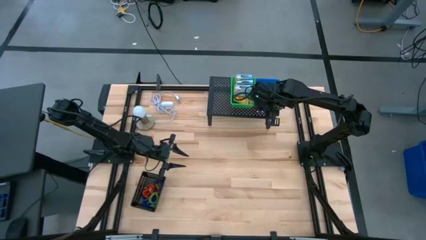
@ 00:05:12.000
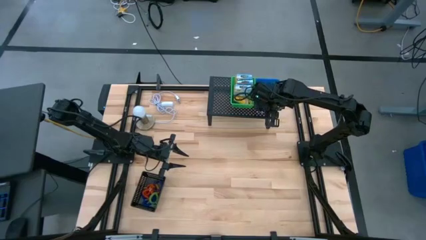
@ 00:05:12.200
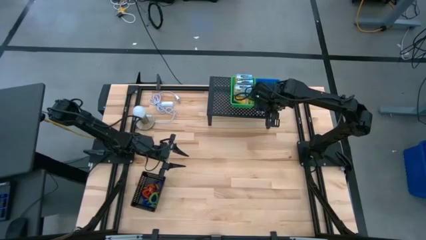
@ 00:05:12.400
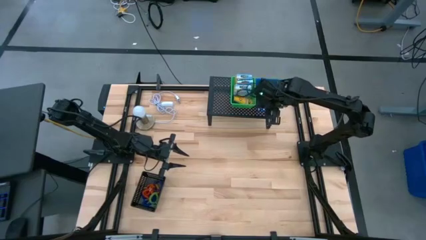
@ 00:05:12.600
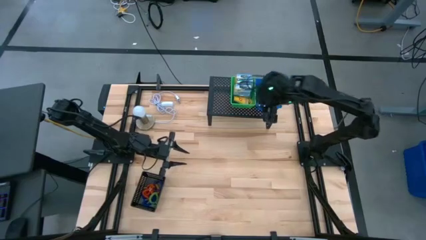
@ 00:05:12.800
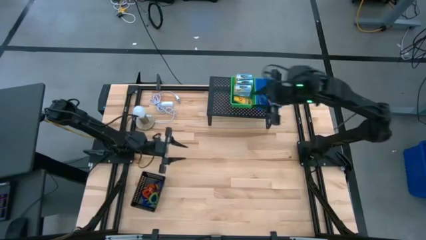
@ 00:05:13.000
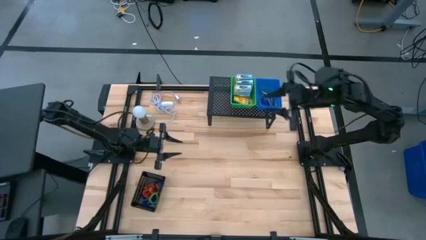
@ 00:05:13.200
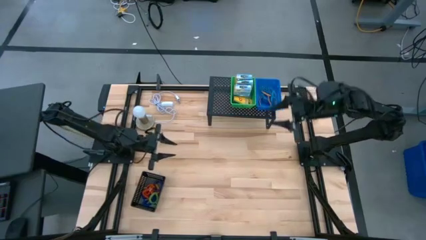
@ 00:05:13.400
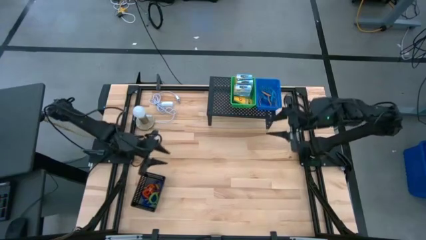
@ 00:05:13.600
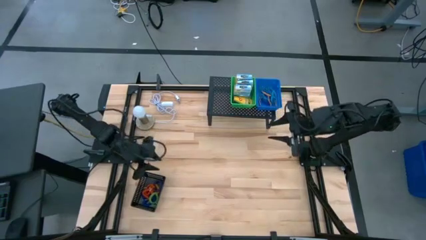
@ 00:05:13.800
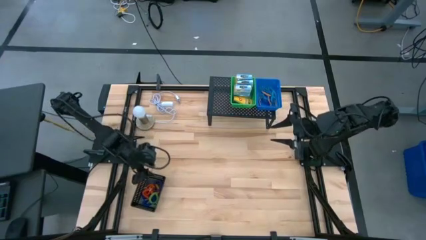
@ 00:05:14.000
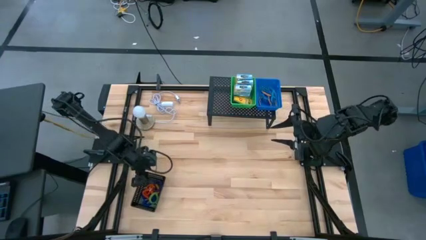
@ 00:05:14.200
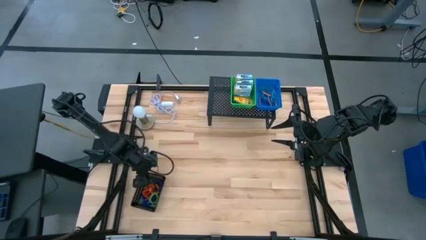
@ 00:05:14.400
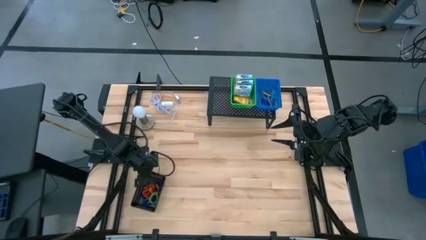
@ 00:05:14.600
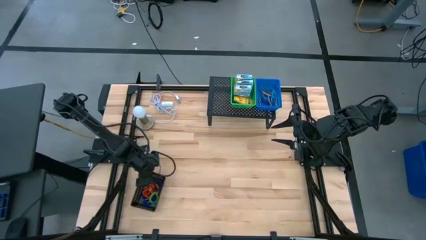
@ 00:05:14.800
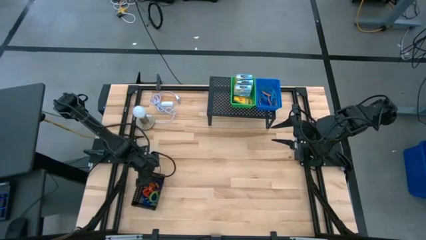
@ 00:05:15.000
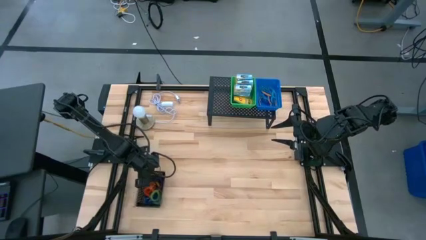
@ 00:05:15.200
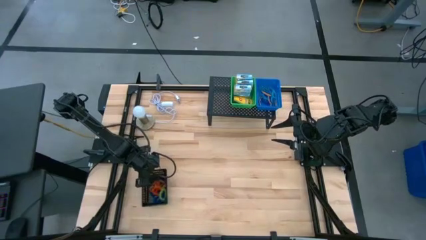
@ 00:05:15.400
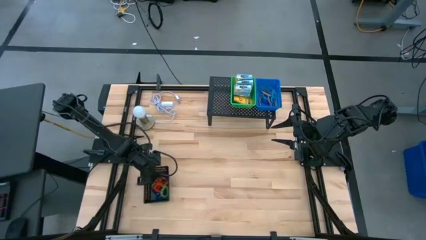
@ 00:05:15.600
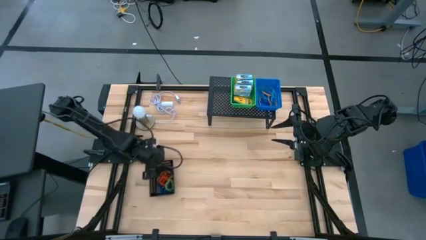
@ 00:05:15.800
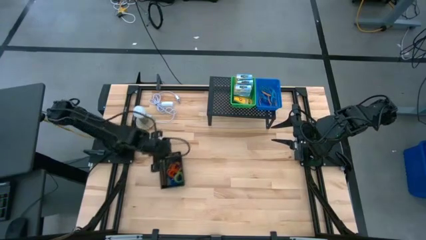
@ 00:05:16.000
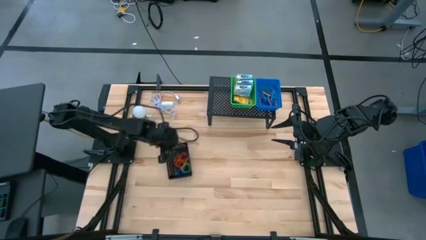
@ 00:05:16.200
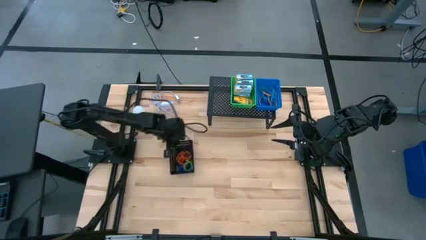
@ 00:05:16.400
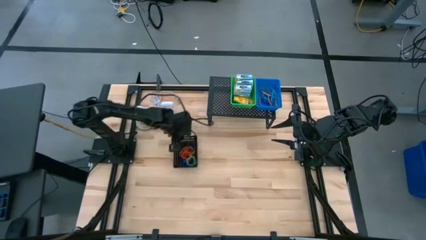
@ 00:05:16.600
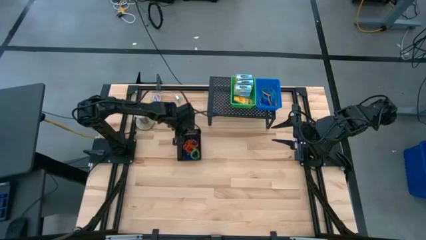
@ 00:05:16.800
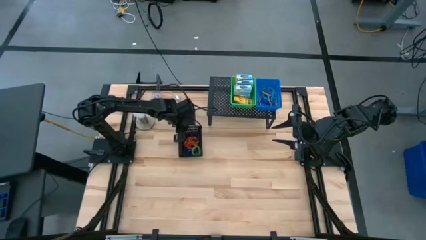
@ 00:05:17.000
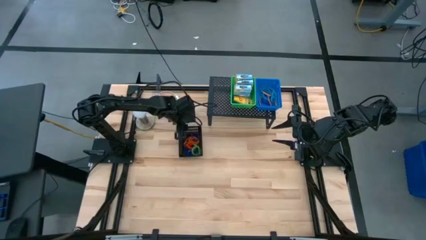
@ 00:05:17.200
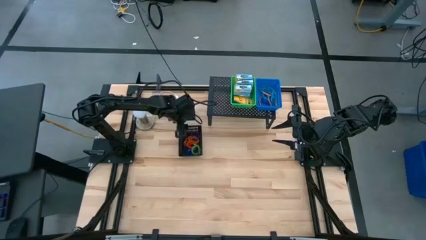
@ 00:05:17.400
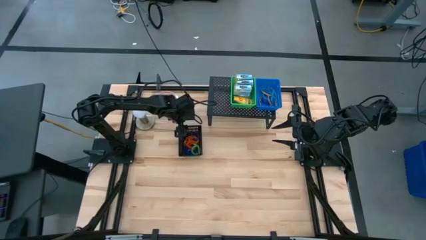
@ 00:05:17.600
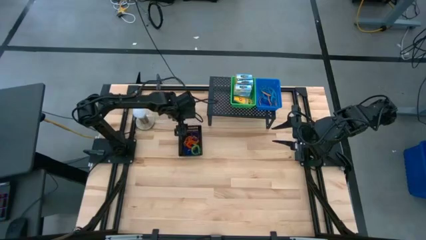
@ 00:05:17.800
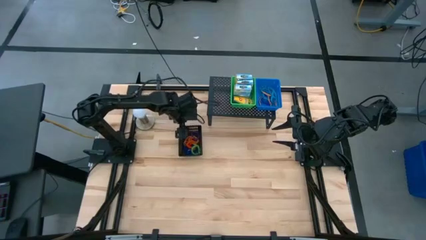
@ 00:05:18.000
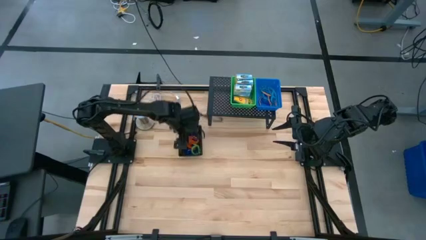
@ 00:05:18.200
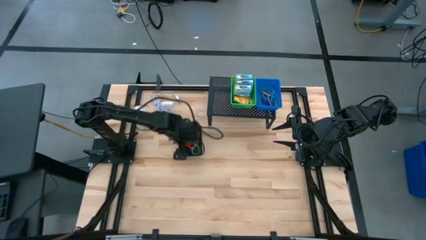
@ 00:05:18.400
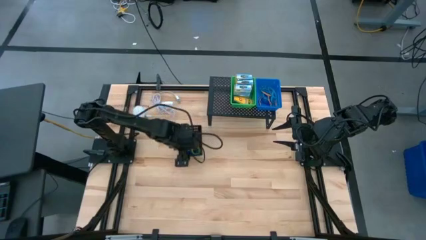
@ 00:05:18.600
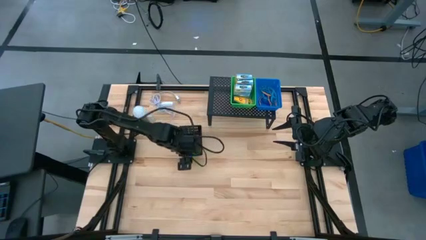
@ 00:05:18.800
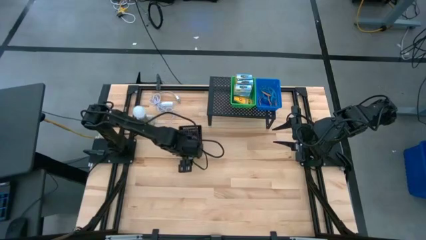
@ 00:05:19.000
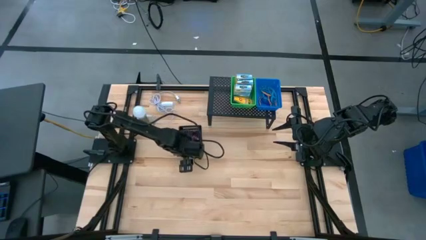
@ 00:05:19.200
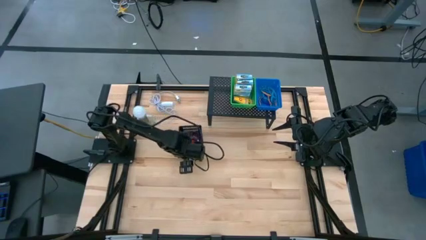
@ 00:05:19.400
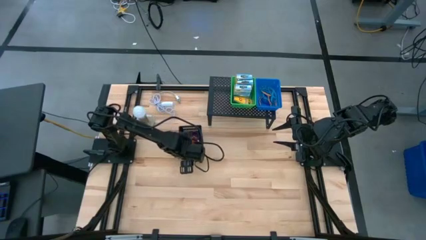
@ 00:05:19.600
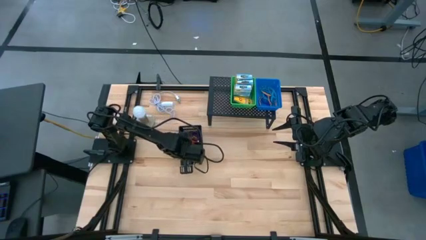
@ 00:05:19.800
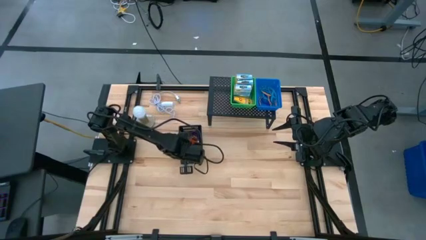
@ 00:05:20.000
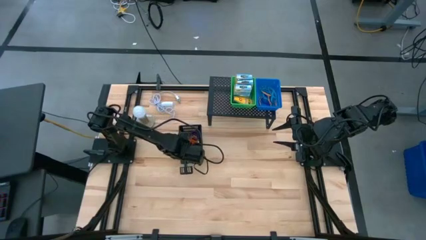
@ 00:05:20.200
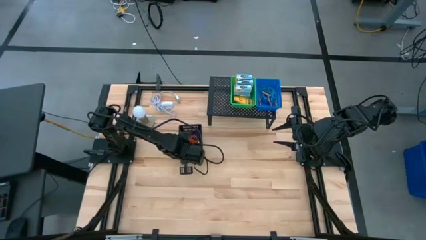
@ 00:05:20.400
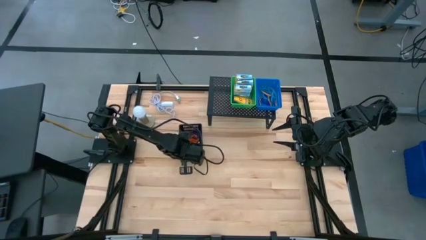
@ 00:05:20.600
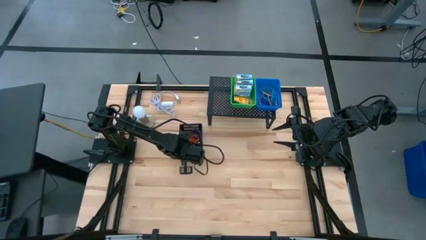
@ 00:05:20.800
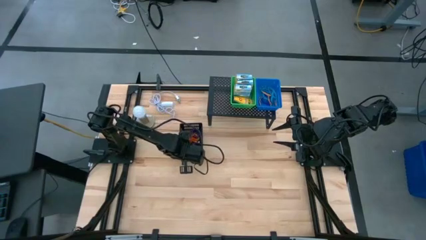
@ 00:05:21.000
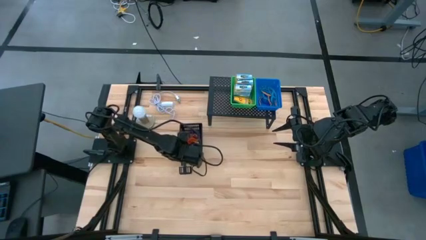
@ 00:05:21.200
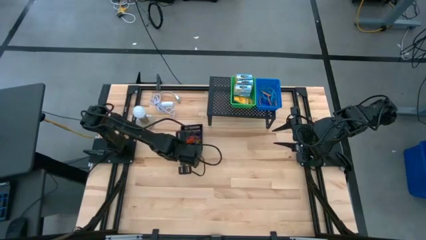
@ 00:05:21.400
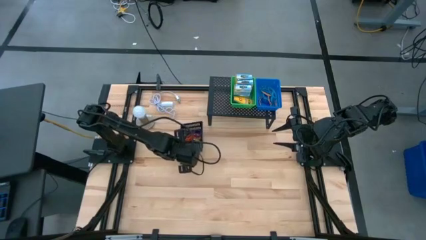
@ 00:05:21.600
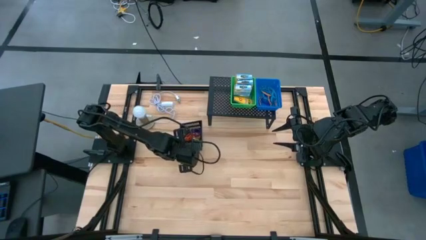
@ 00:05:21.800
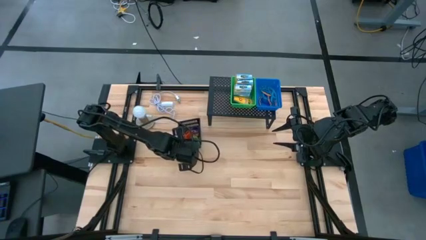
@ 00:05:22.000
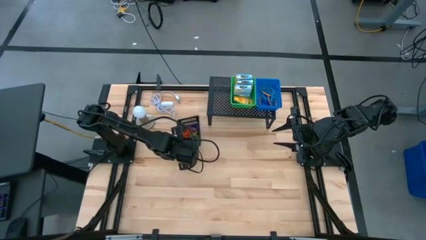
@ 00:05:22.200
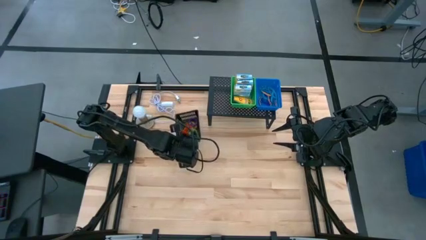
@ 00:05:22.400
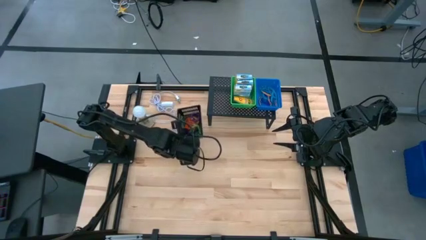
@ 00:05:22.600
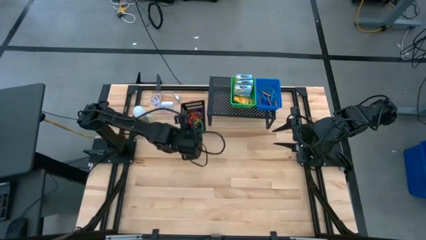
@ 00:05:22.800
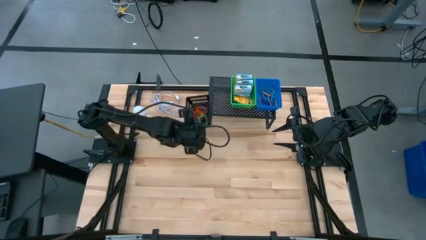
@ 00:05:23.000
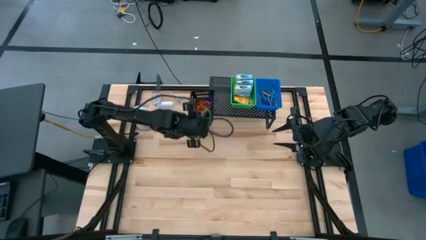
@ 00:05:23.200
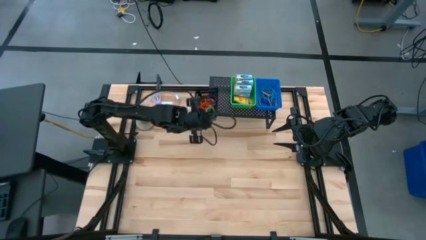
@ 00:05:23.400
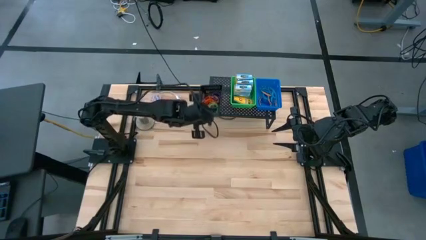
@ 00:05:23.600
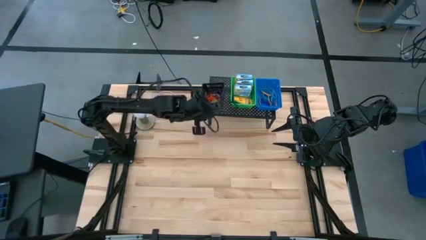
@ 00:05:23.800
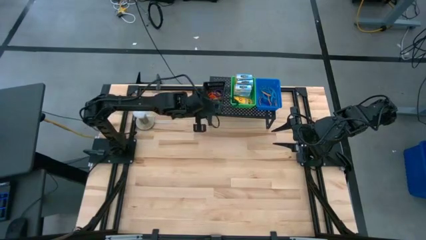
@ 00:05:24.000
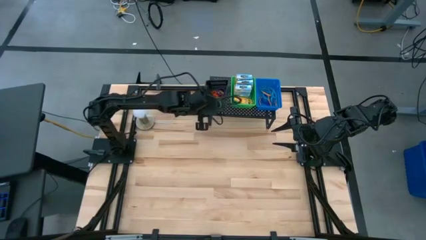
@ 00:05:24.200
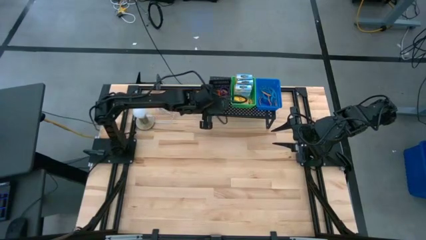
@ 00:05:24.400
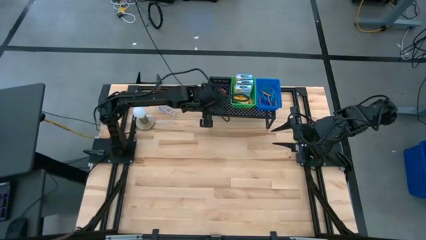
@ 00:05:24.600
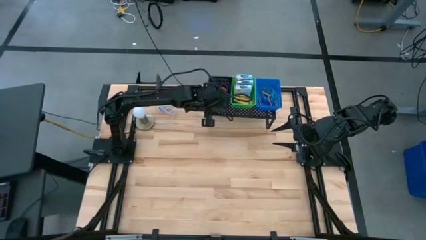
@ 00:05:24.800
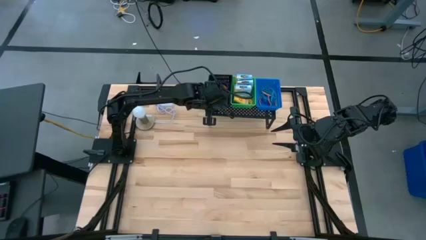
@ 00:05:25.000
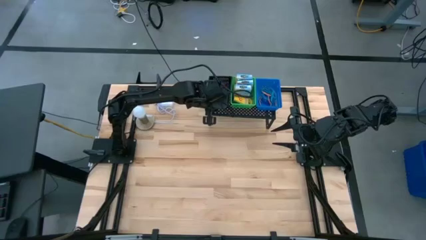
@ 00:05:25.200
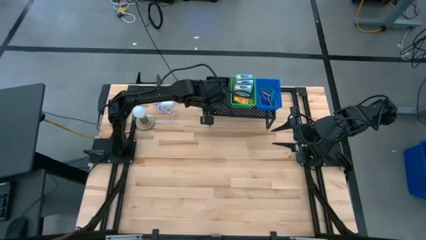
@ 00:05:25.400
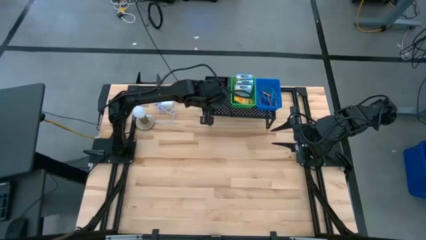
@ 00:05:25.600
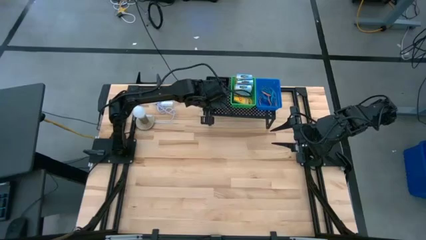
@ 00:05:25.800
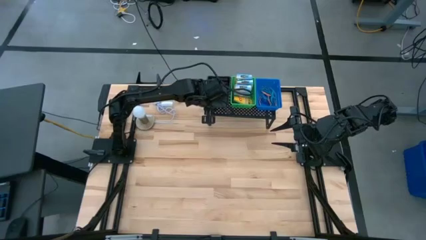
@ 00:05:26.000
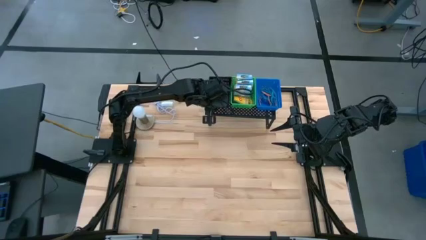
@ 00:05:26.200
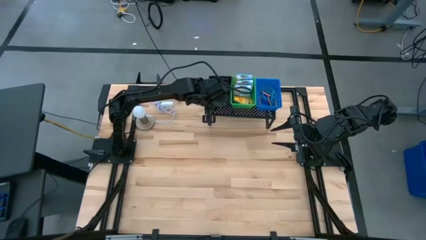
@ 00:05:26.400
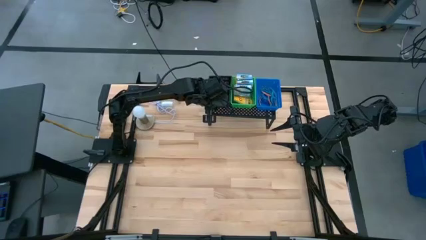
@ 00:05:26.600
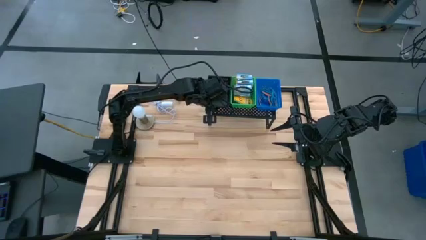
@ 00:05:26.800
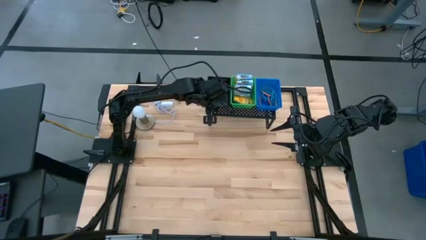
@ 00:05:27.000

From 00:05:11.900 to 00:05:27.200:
Task: Pick & Place Office Desk Supplies
Put the black bin into the shelf
